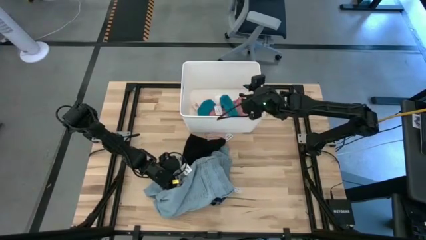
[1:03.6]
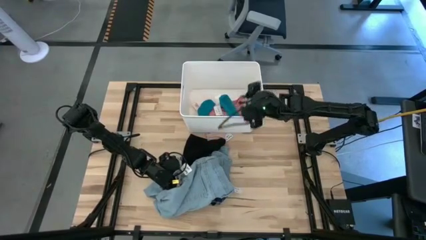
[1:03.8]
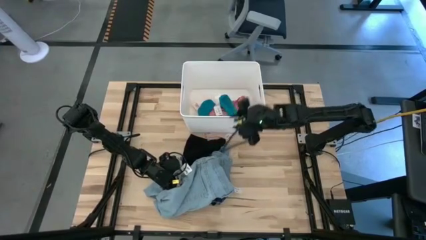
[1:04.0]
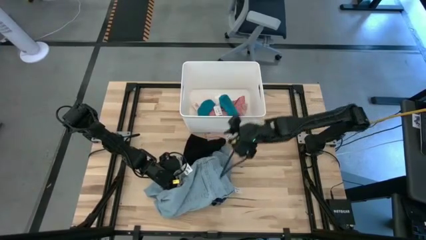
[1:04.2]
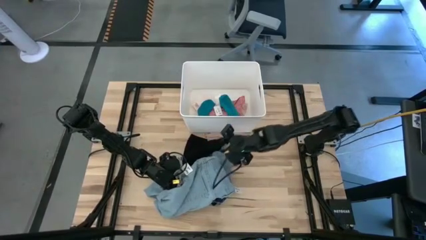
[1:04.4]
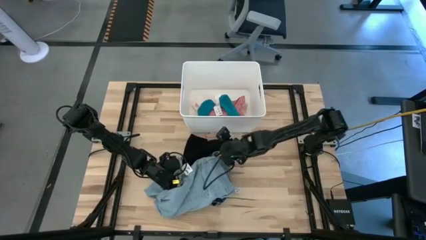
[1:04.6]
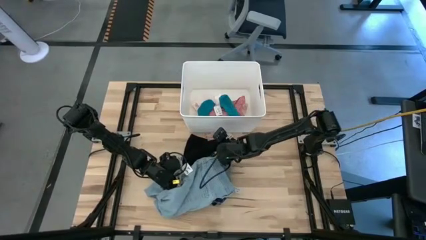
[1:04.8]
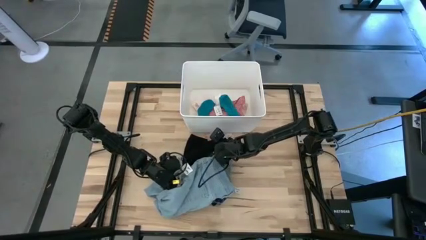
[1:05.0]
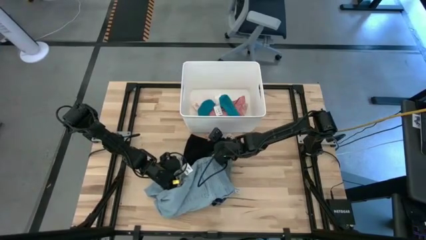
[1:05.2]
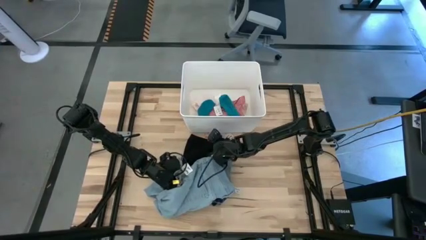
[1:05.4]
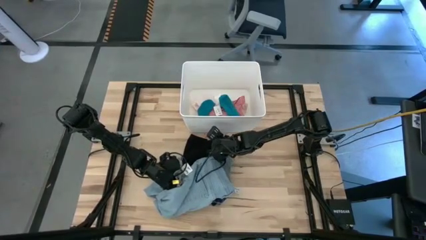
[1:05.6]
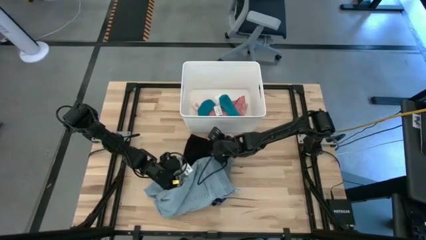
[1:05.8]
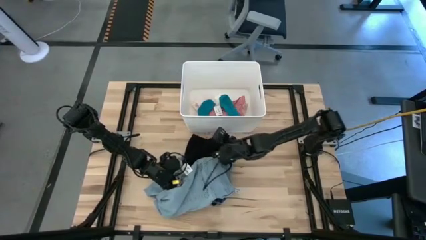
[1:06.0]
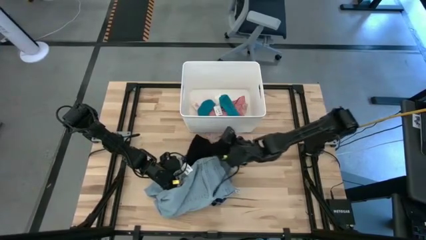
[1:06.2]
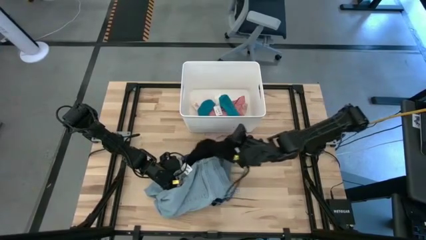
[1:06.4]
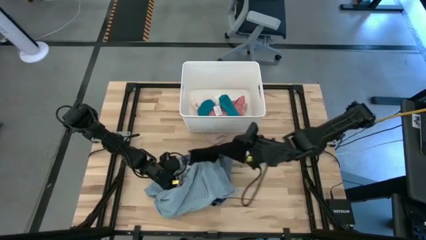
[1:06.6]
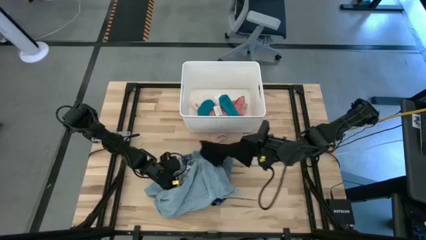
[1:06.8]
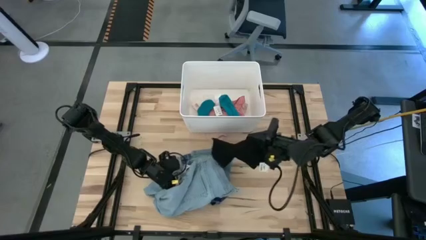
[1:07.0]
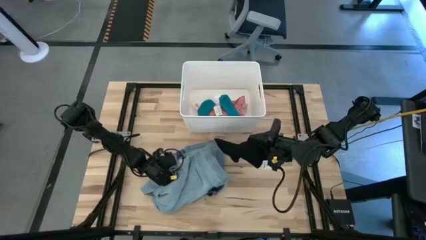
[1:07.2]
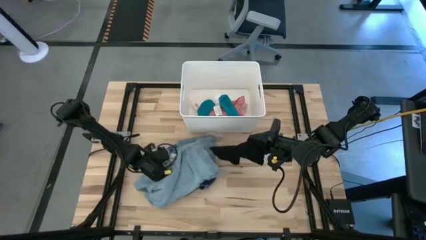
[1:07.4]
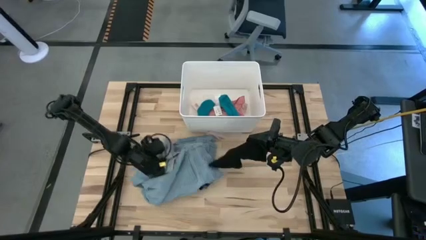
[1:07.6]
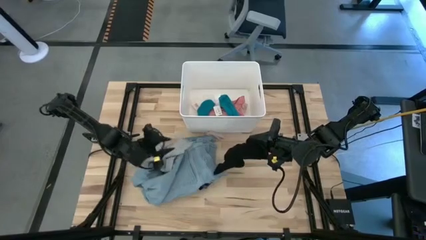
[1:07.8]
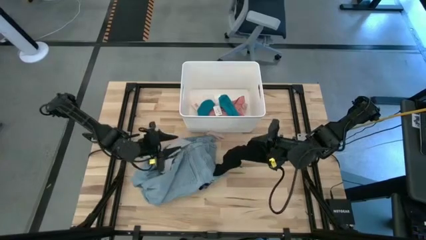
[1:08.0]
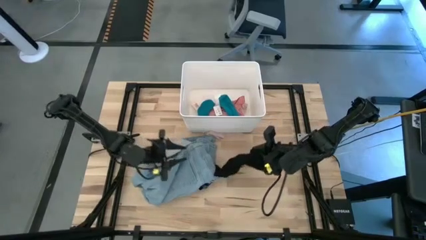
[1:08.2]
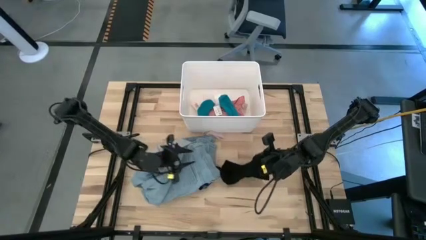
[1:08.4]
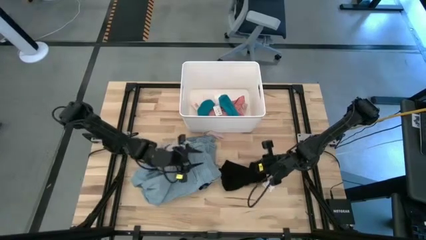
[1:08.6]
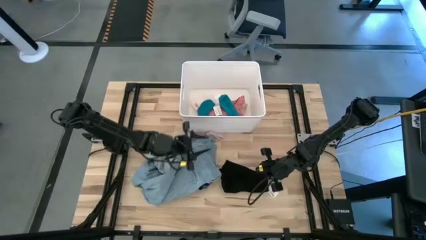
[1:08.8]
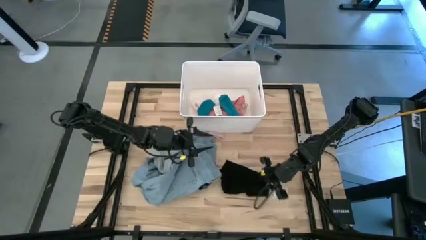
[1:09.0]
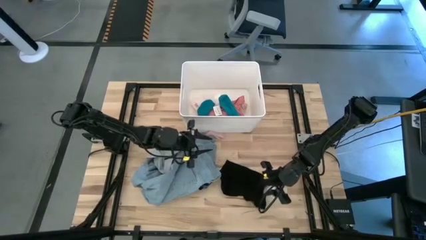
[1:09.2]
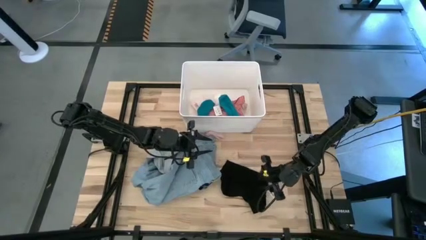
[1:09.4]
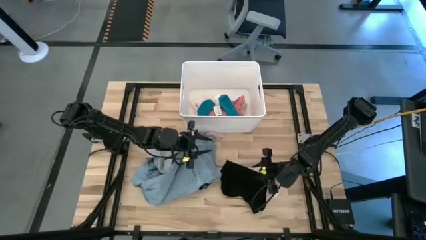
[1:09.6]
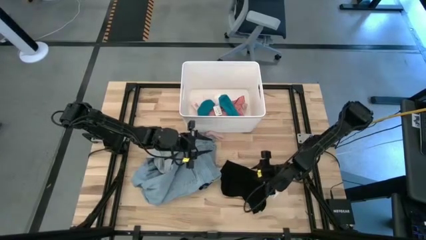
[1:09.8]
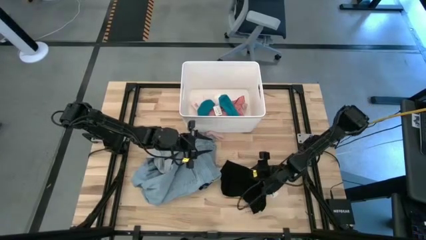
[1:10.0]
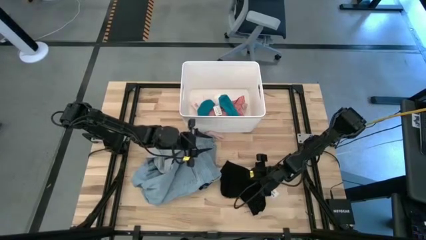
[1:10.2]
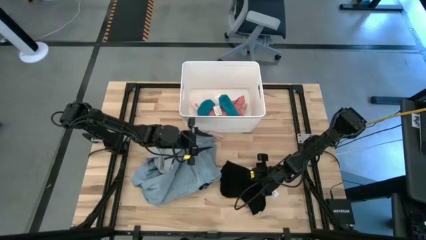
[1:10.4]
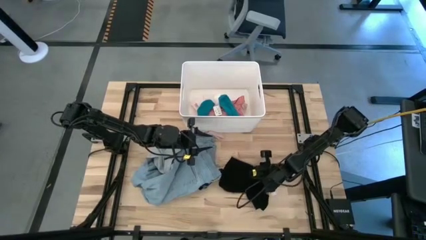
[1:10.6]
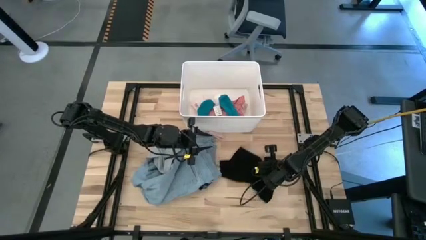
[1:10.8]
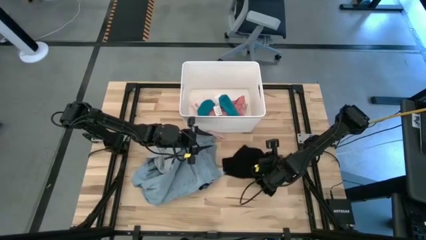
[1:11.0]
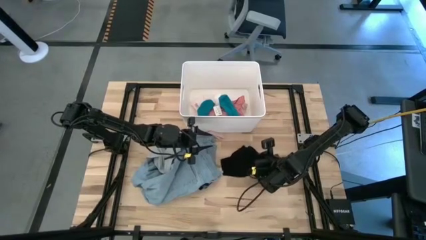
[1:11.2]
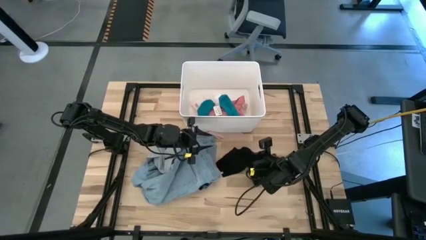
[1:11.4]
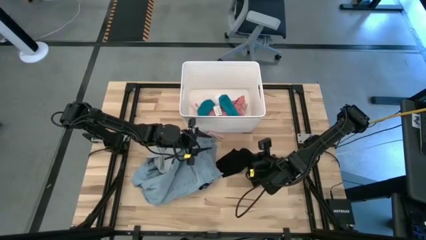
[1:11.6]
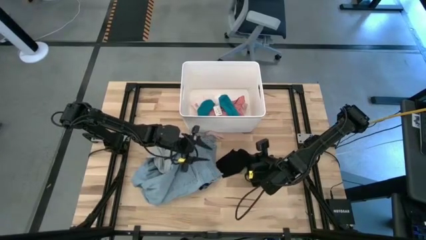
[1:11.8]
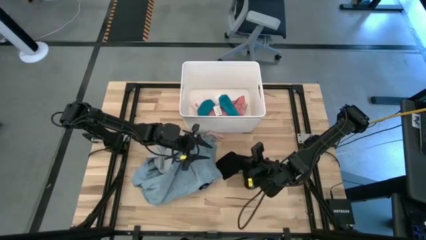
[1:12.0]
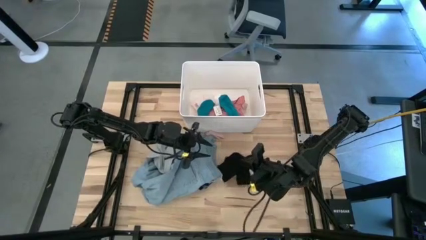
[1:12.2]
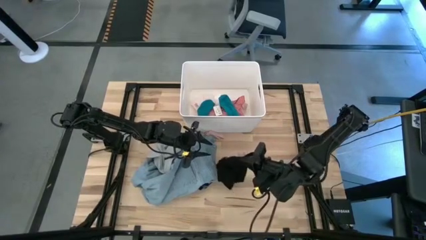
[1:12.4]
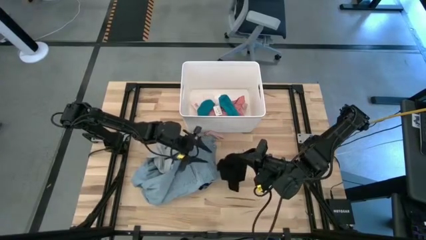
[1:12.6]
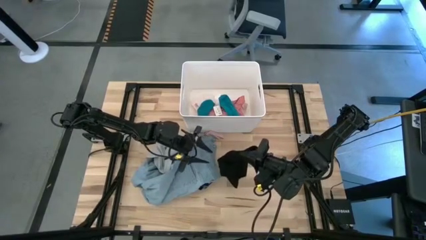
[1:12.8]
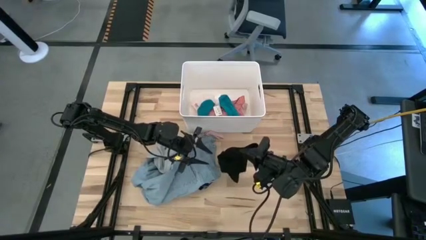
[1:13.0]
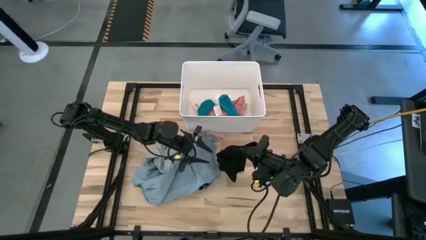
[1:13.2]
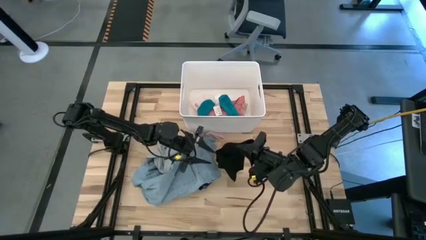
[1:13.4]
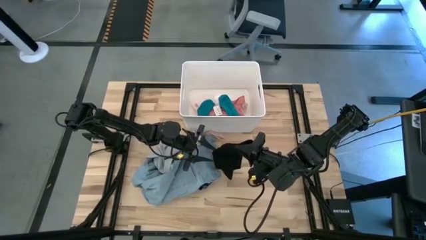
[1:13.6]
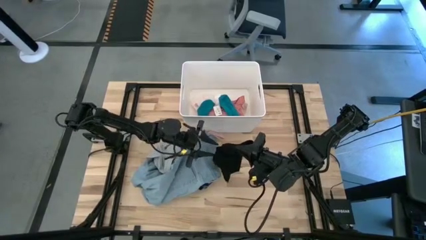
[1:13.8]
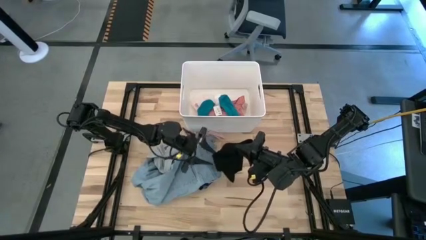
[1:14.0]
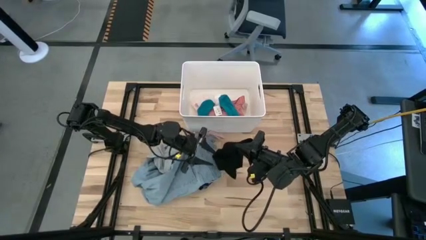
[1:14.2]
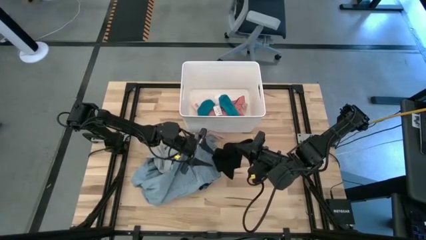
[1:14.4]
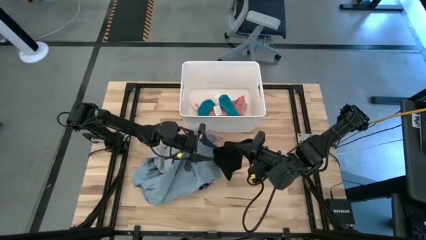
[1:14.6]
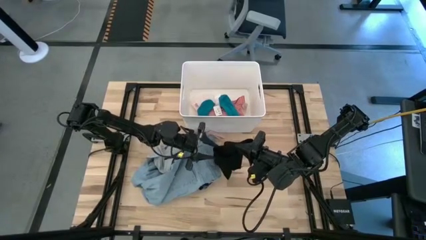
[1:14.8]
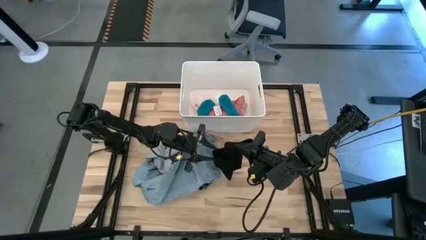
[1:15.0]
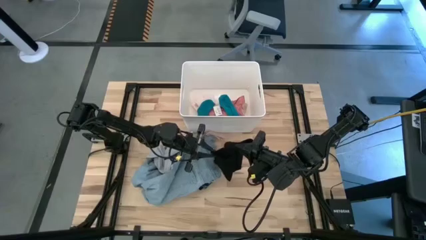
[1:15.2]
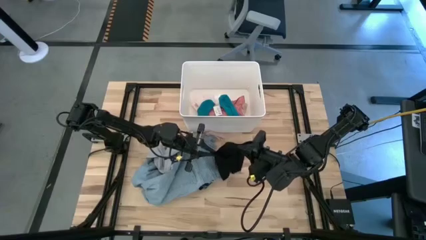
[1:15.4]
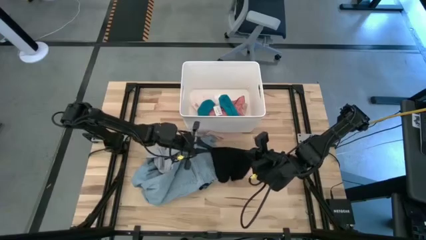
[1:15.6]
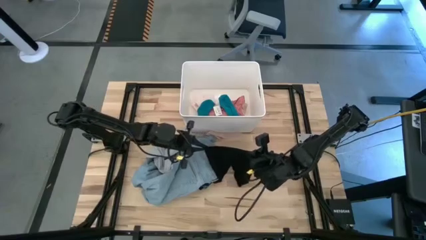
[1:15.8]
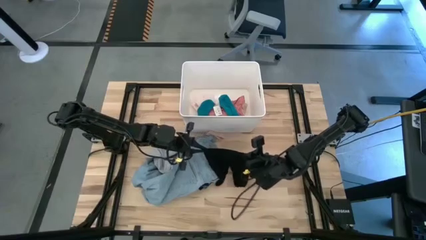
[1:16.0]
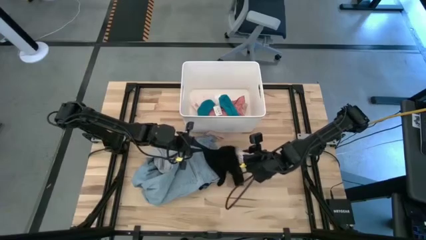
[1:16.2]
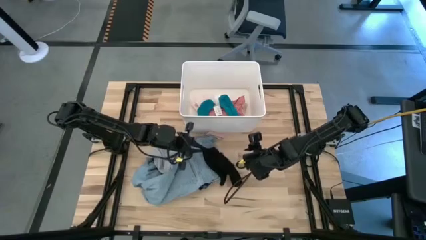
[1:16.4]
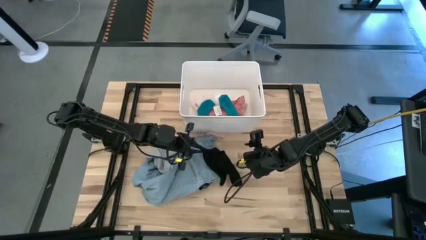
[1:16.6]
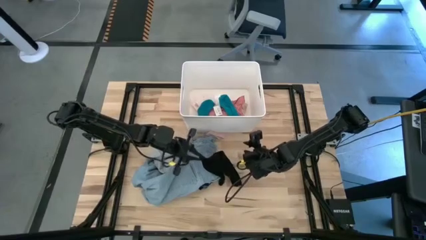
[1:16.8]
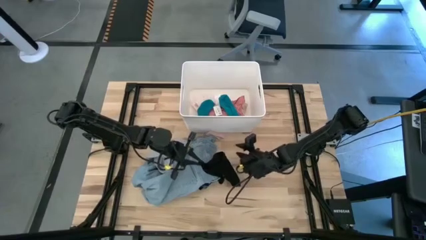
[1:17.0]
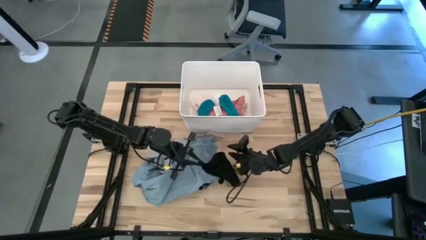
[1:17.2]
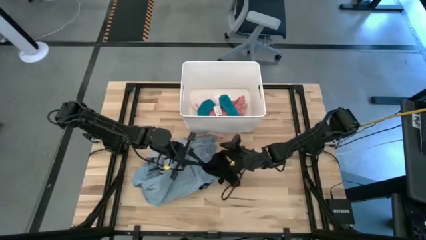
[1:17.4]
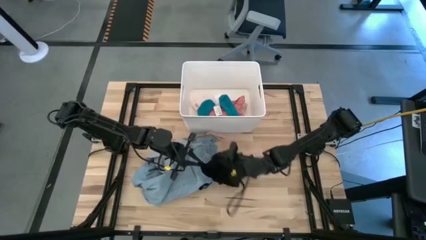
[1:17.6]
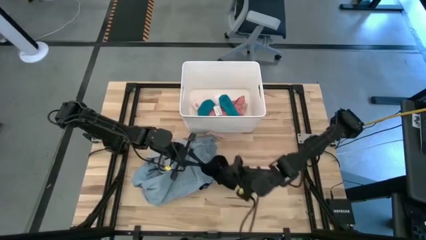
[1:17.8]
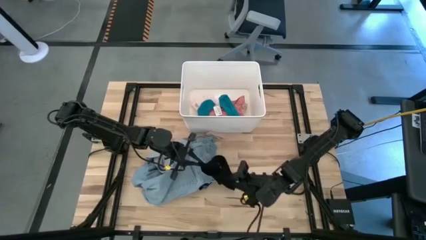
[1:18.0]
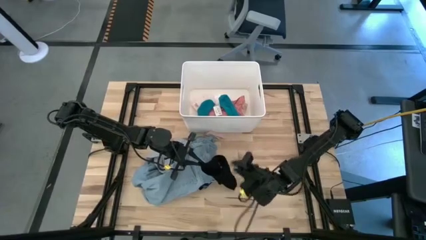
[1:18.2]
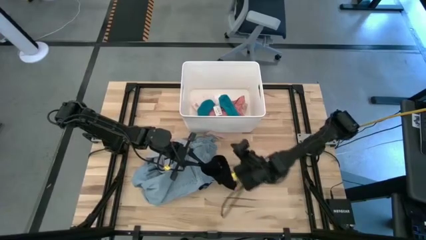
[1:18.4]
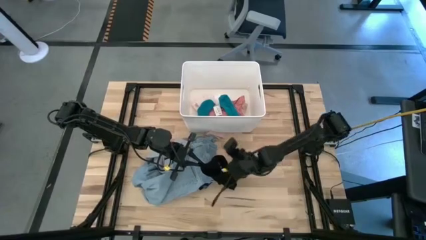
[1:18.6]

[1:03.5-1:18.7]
Task: Sort clothes
Put the black shorts into the white laundry bin

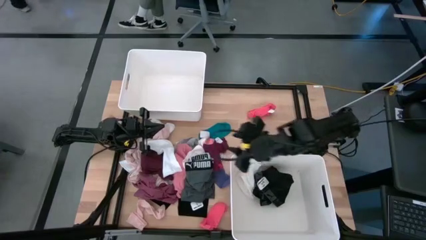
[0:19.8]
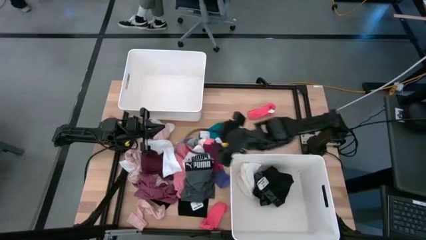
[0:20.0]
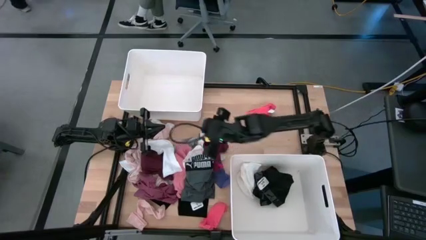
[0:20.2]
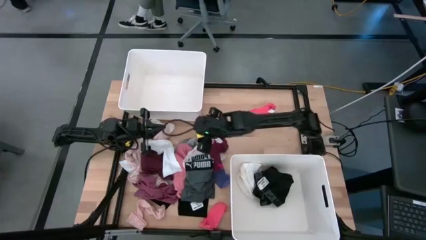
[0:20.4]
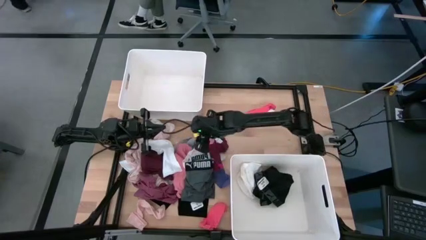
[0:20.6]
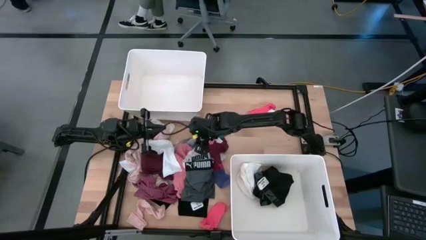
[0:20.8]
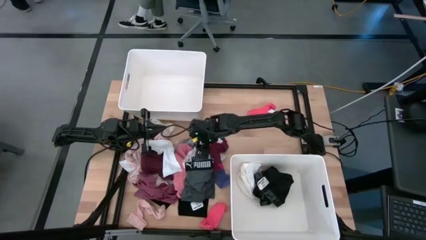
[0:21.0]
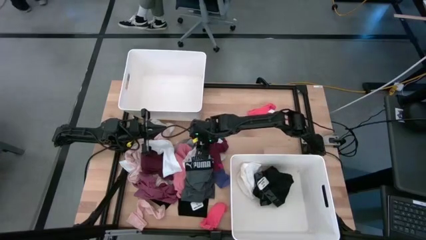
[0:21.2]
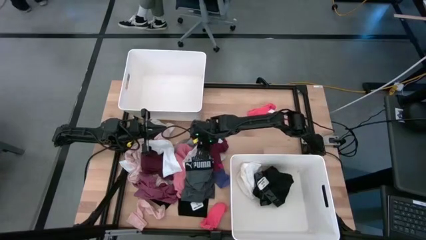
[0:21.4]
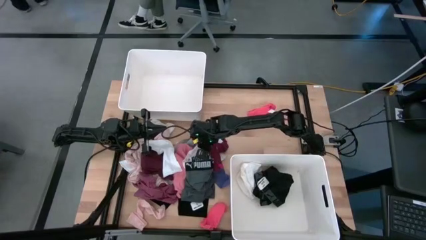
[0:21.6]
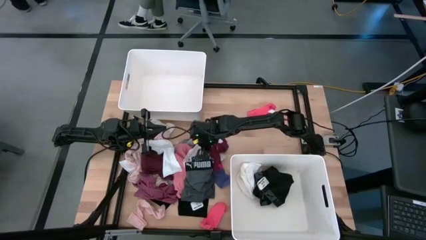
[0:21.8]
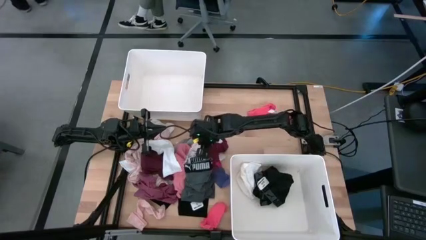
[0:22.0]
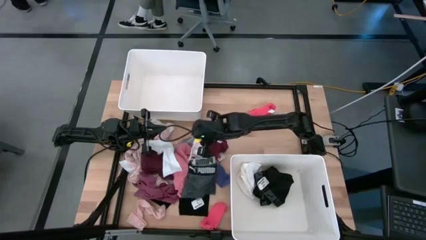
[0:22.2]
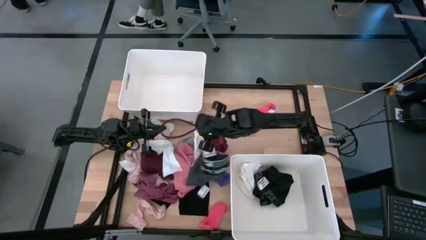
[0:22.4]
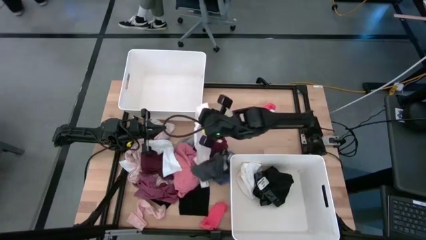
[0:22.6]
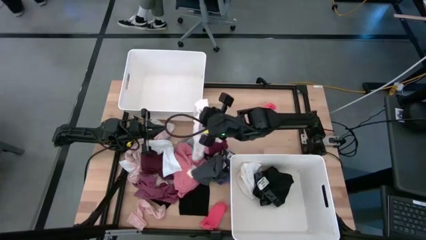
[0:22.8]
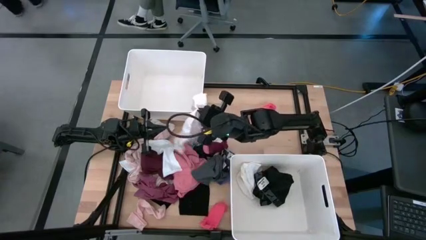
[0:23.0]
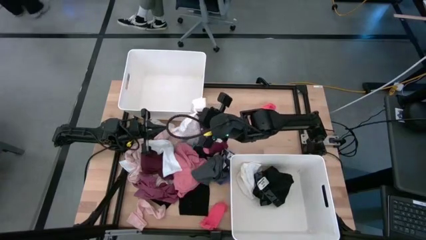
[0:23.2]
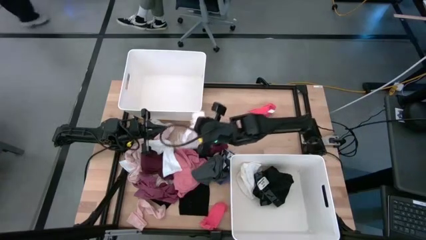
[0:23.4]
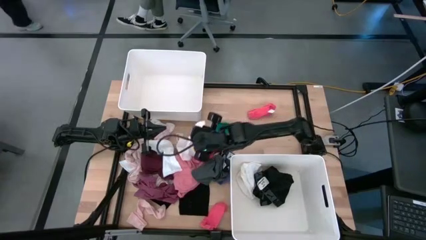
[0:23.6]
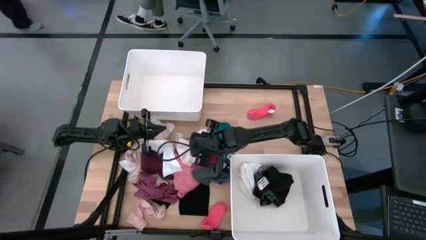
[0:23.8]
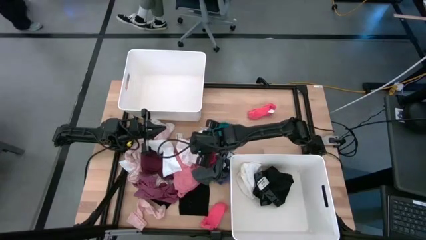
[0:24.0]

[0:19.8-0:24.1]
Task: Sort clothes
Put the white sock into the bottom white bin
